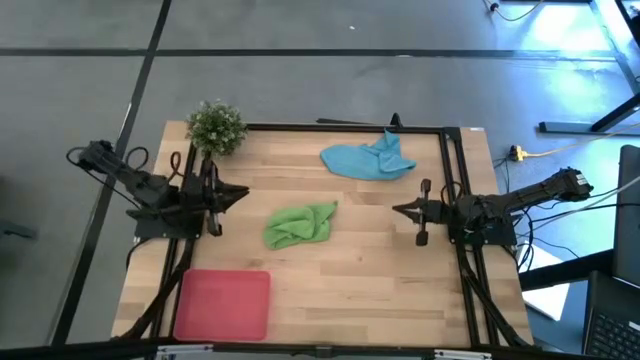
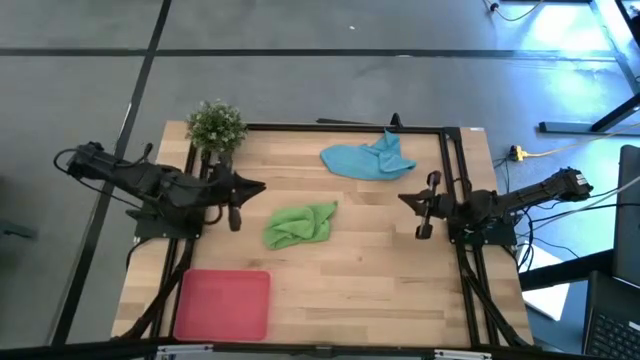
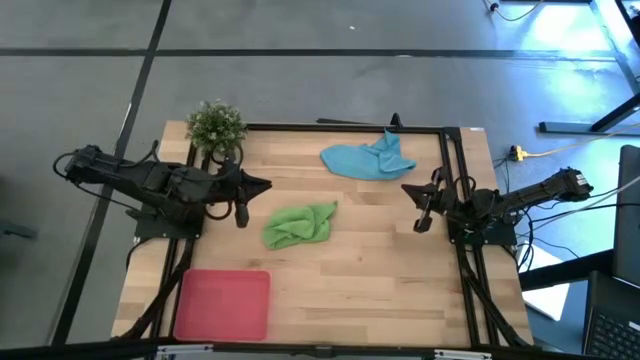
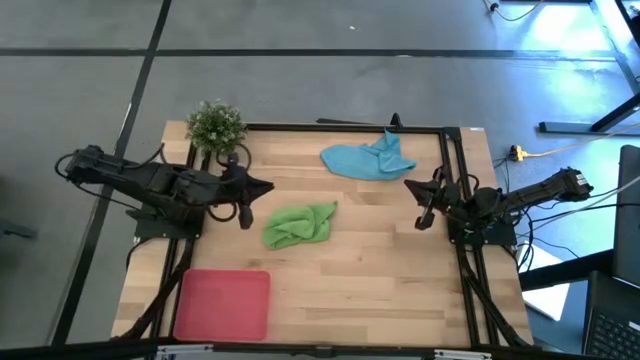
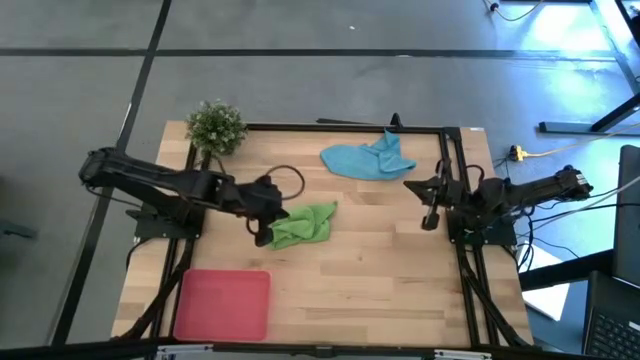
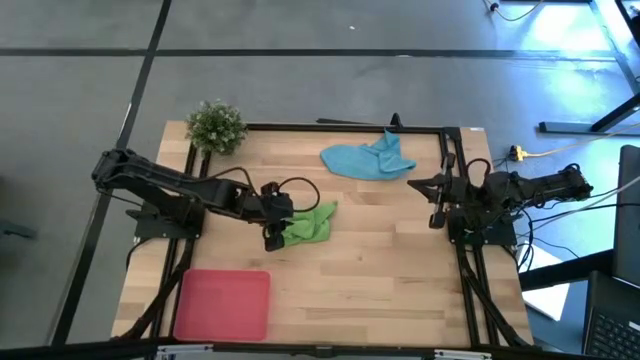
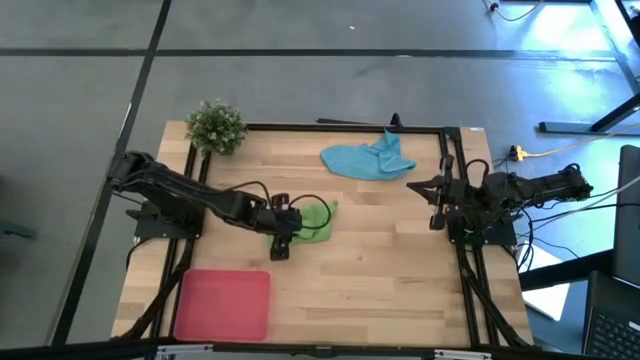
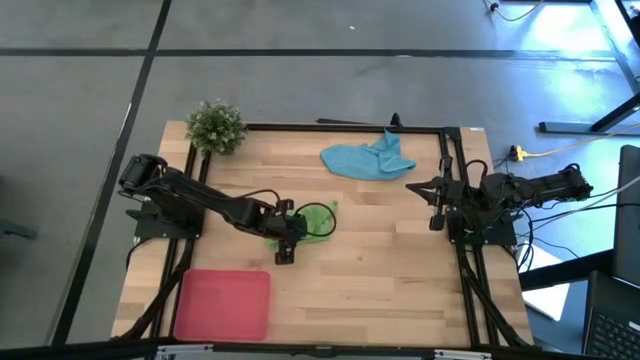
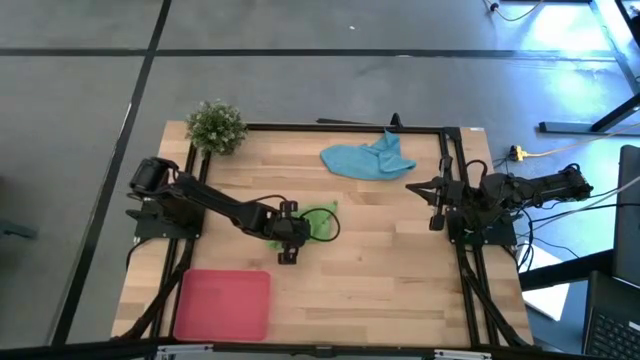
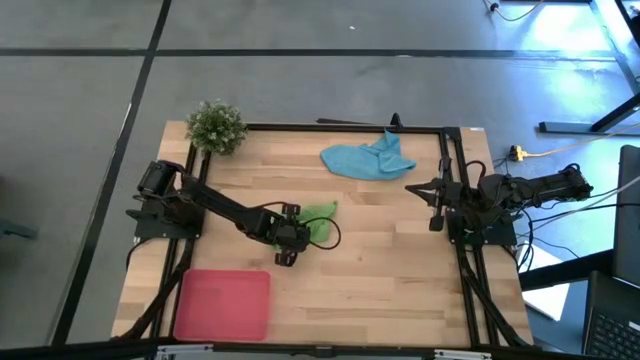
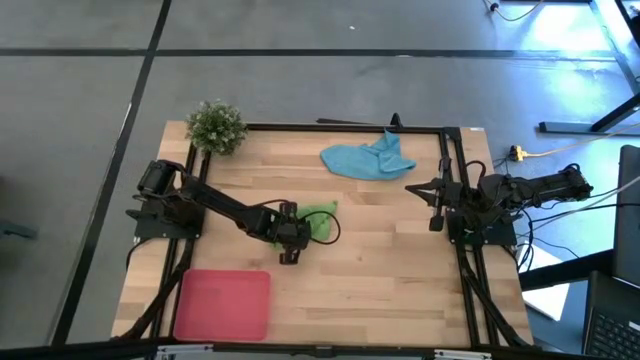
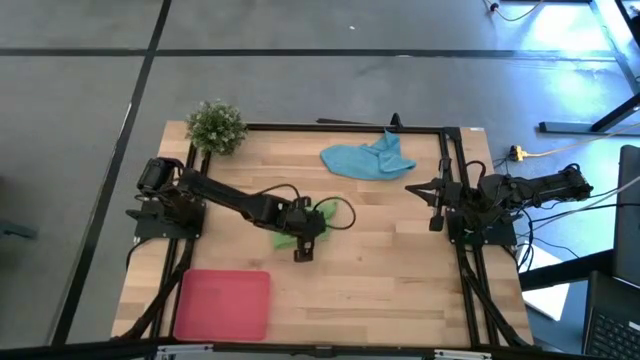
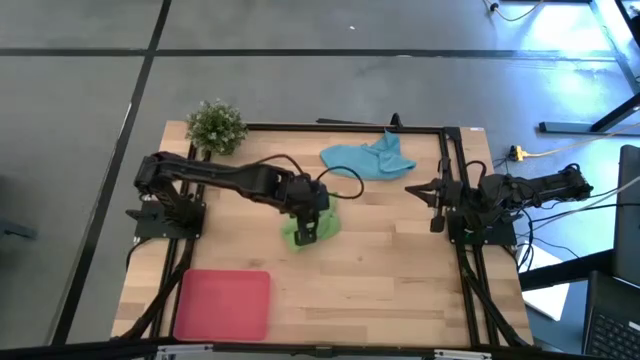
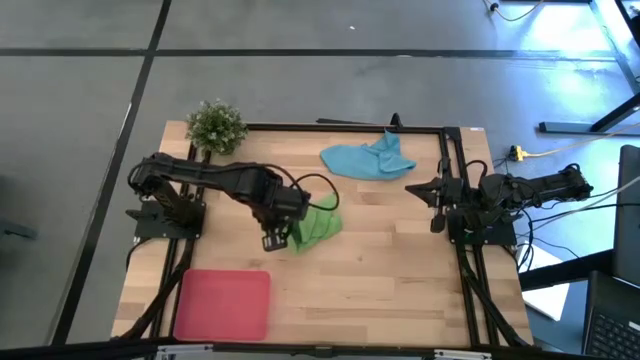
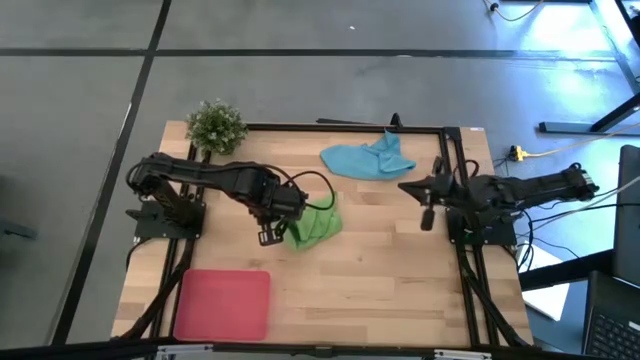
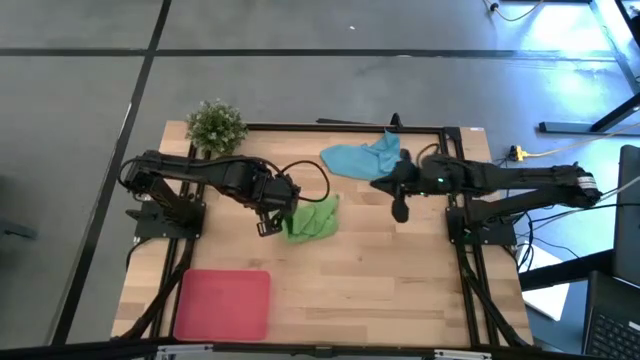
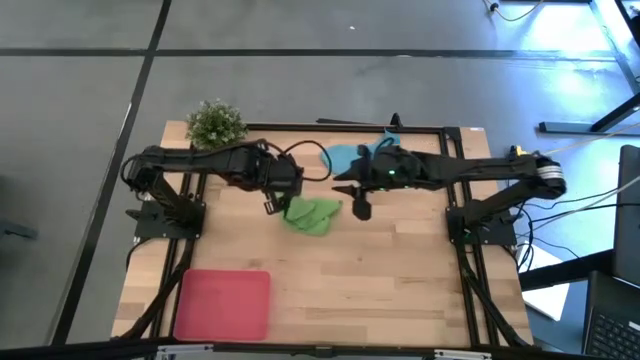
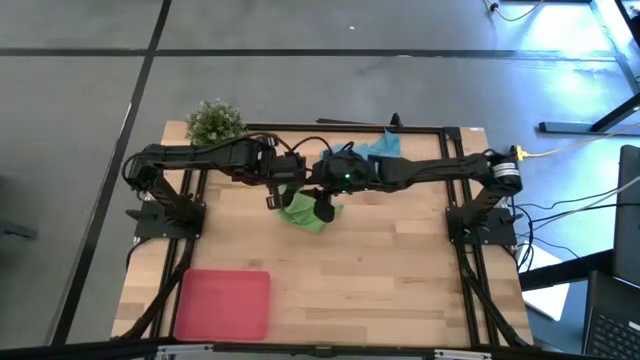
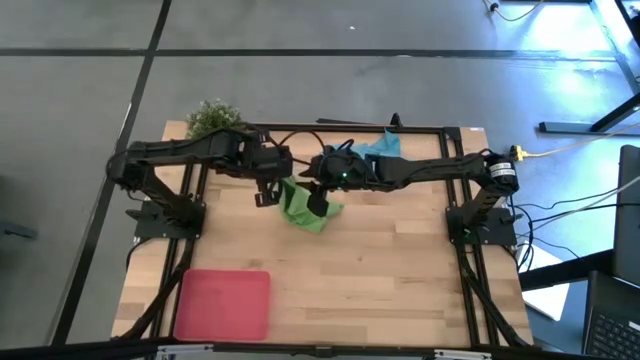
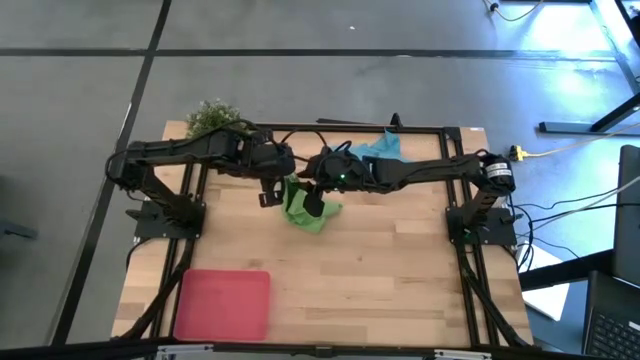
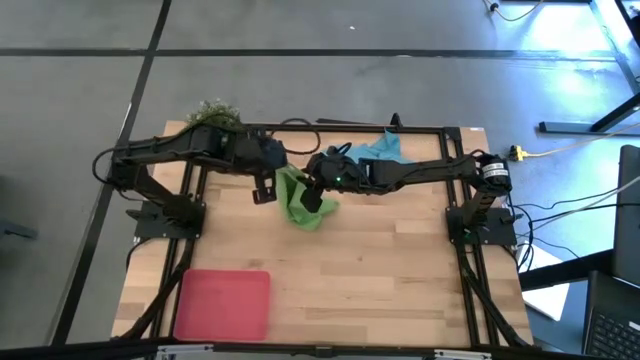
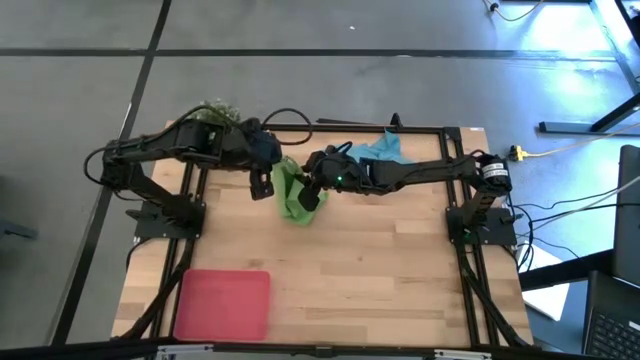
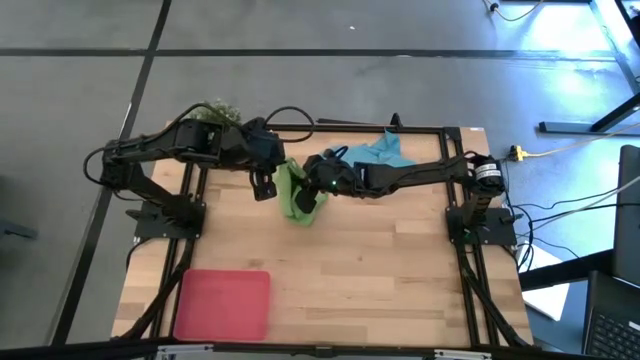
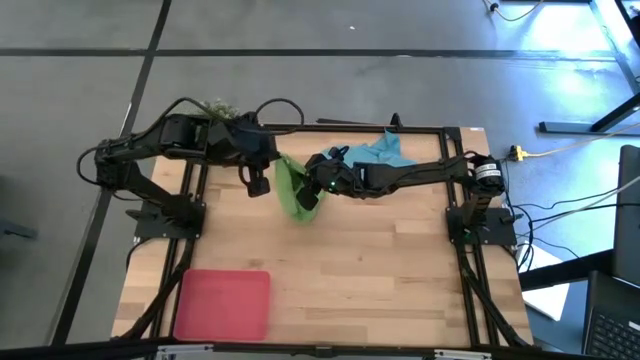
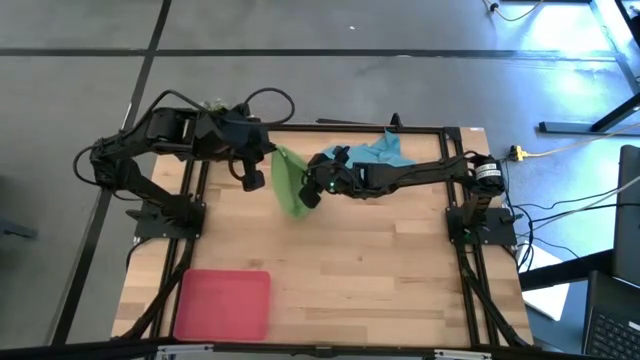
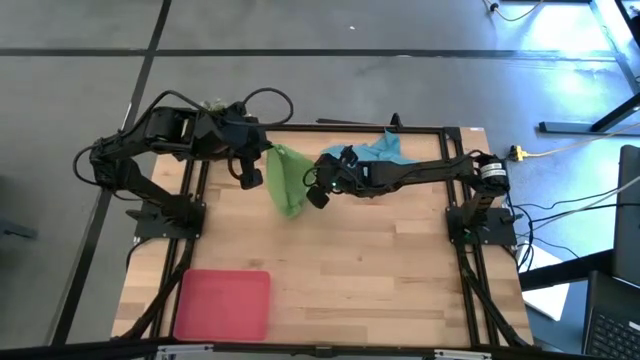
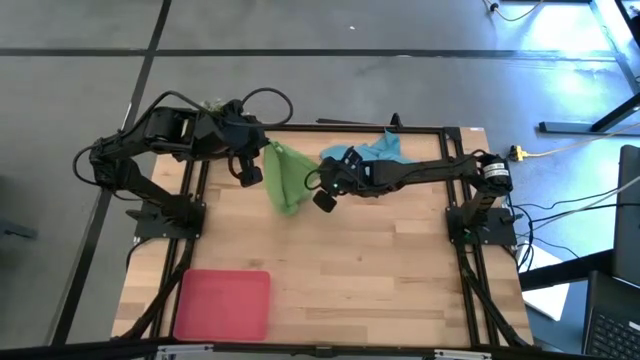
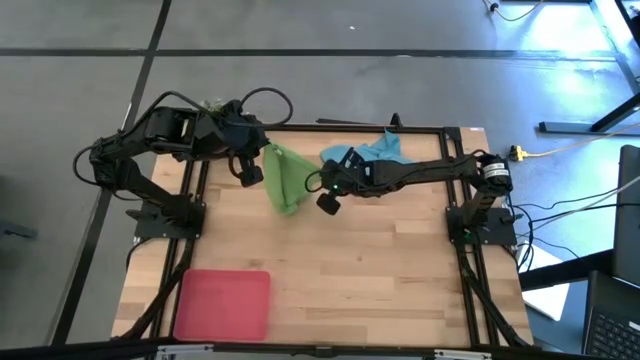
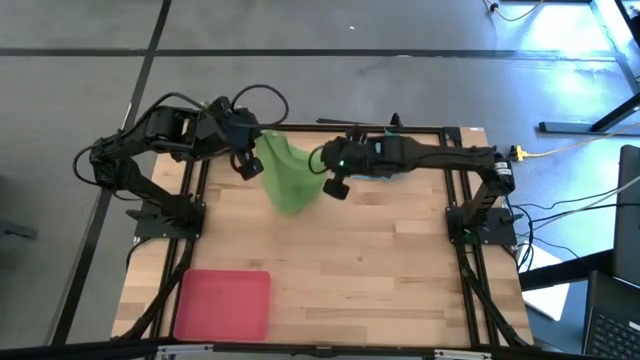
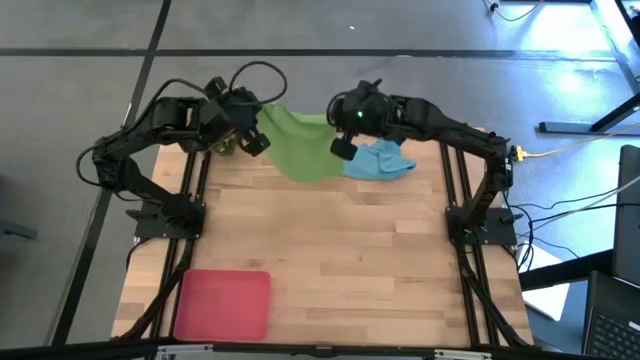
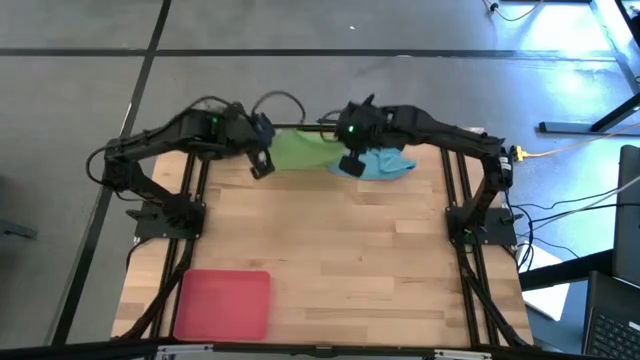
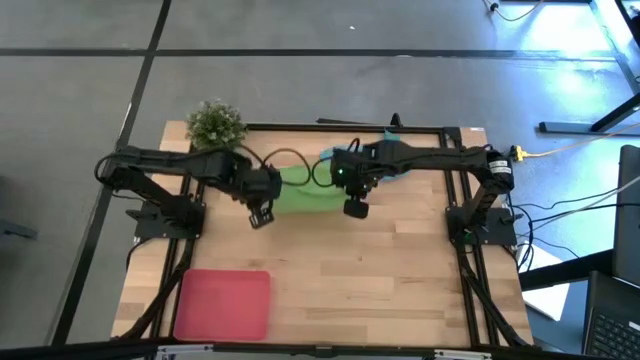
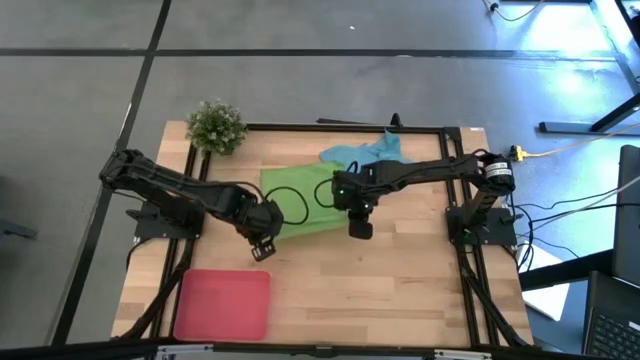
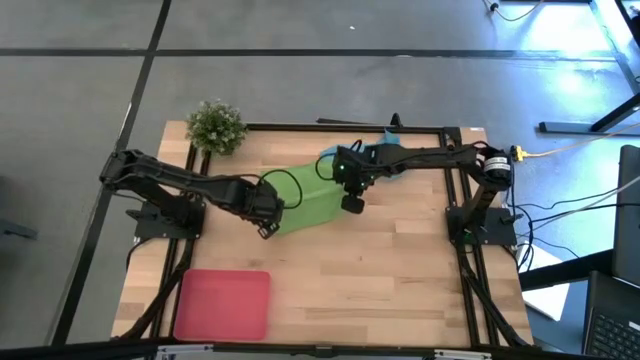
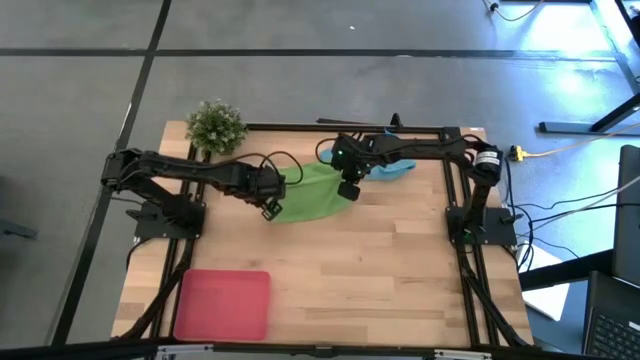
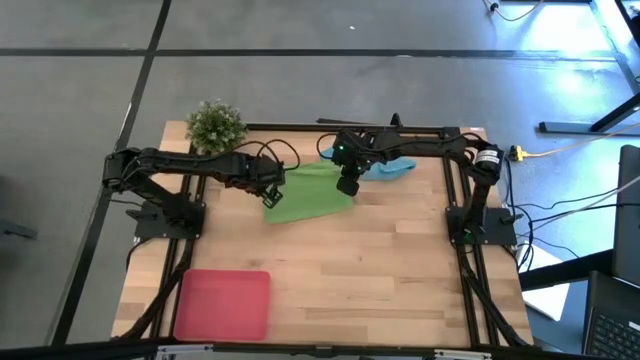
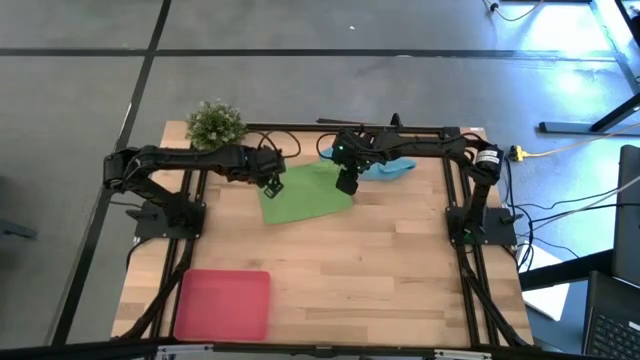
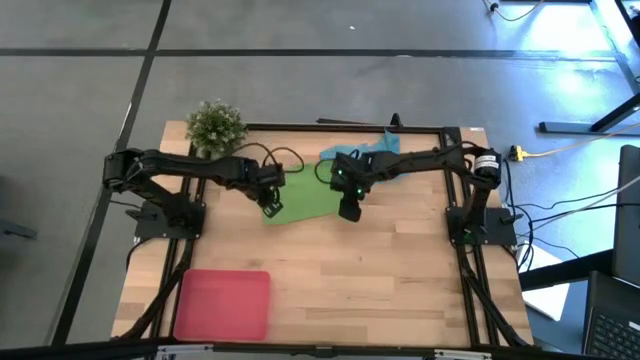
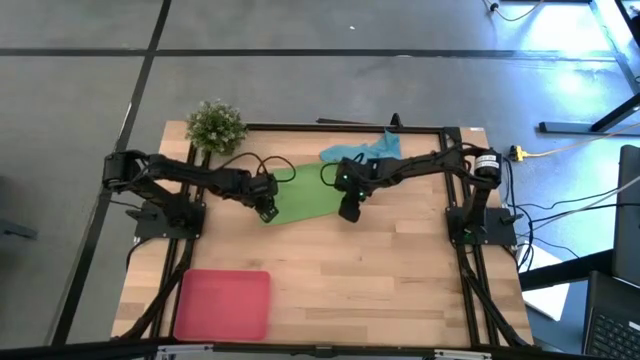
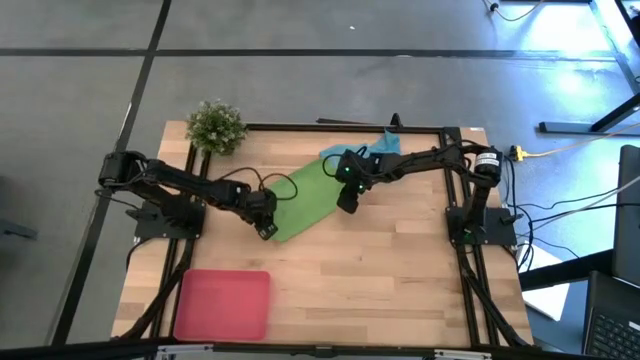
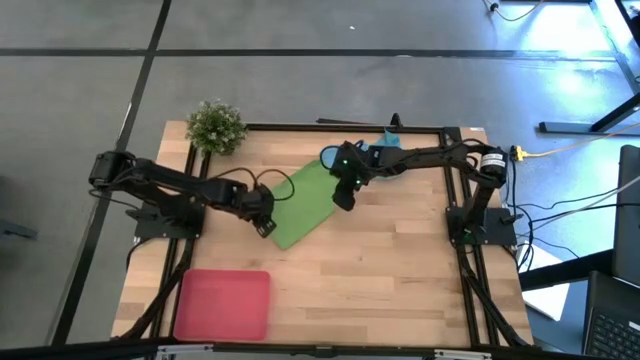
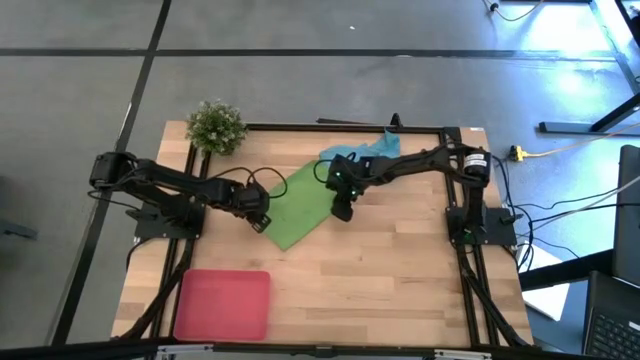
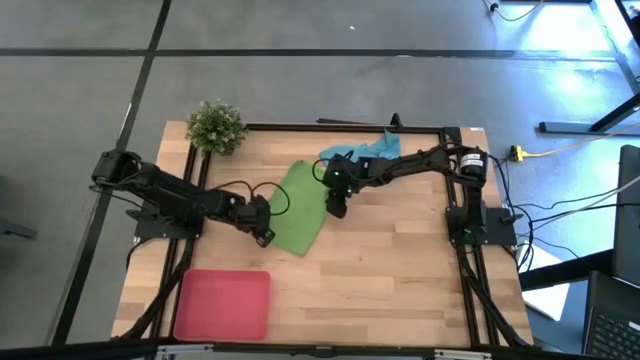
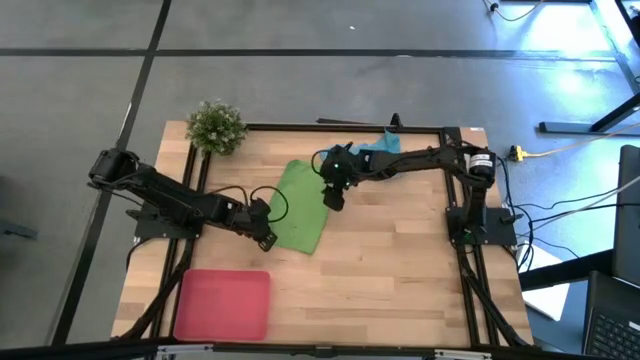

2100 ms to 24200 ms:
Task: Roll microfiber towels into tight, uniform cylinder then place into a basket
Roll the microfiber green towel
